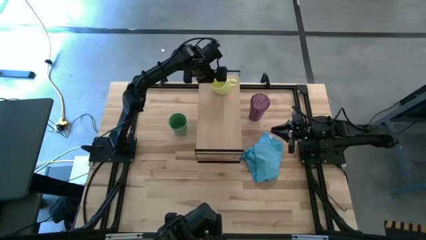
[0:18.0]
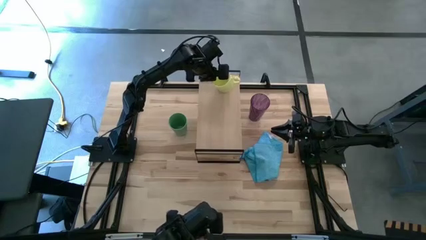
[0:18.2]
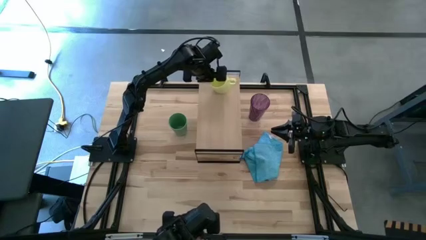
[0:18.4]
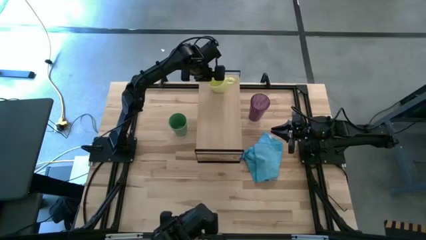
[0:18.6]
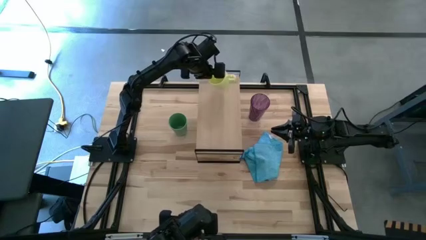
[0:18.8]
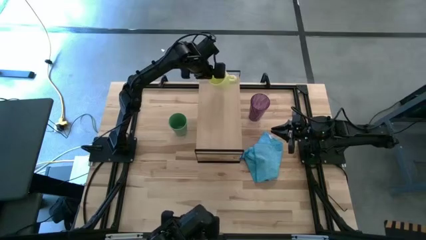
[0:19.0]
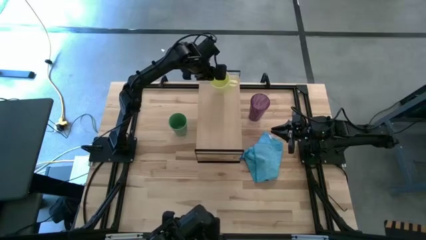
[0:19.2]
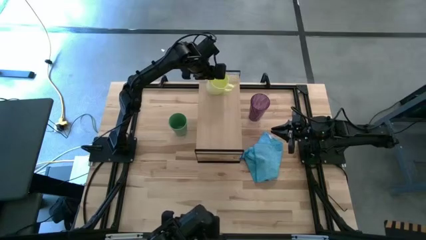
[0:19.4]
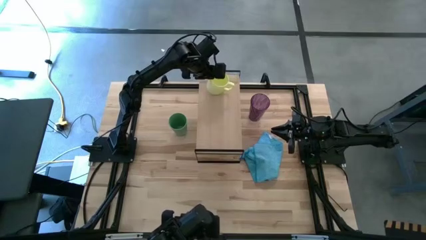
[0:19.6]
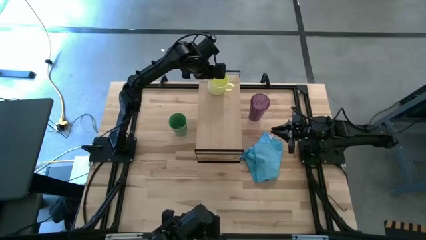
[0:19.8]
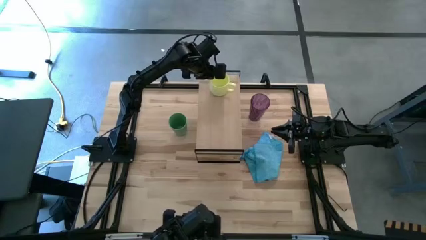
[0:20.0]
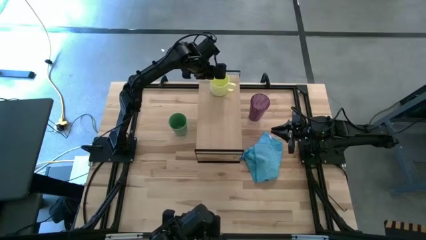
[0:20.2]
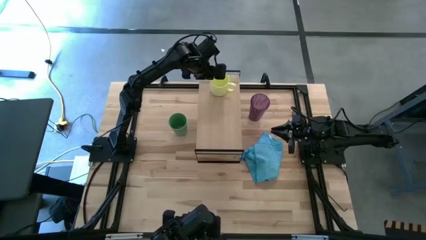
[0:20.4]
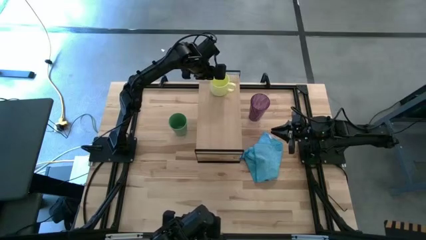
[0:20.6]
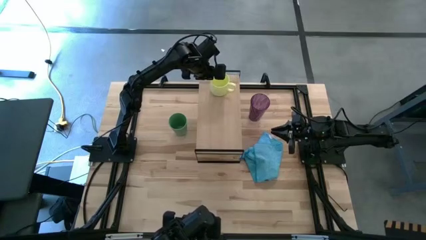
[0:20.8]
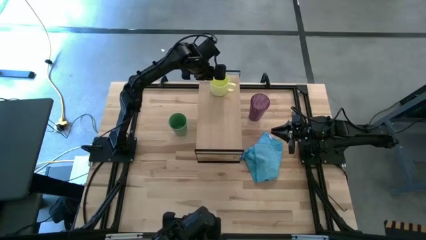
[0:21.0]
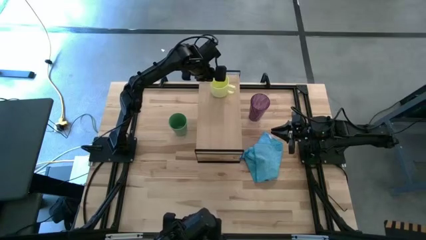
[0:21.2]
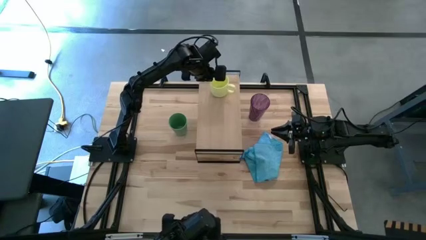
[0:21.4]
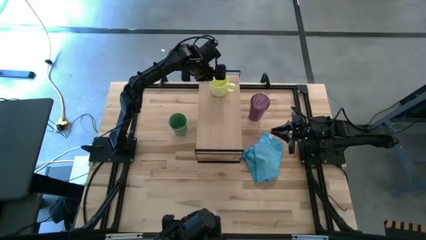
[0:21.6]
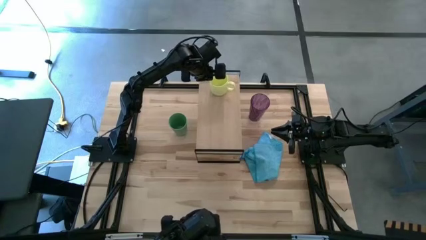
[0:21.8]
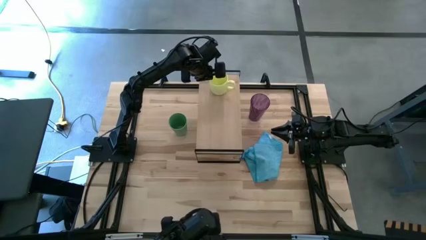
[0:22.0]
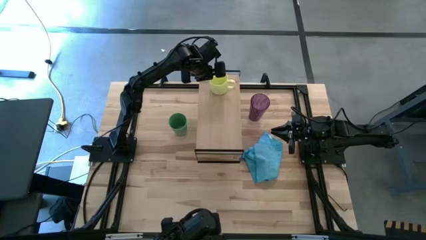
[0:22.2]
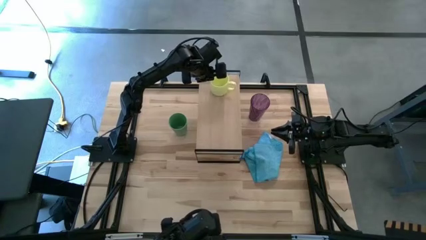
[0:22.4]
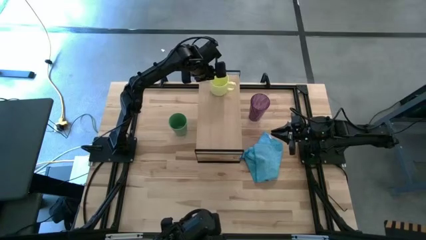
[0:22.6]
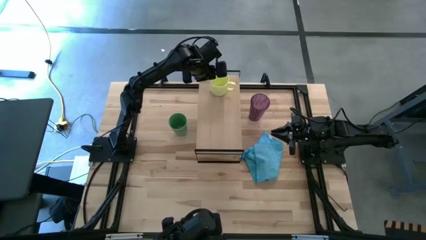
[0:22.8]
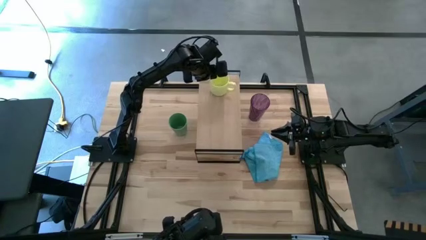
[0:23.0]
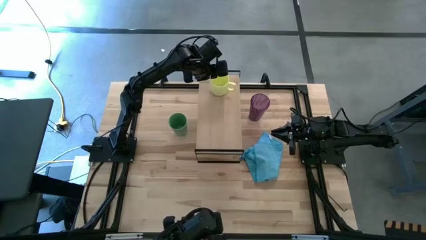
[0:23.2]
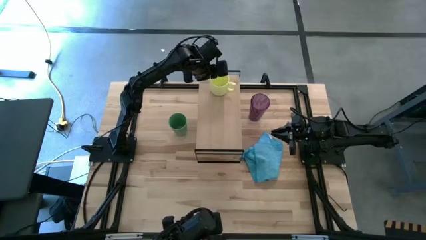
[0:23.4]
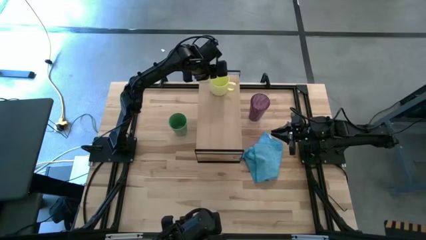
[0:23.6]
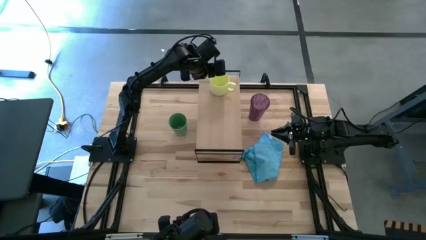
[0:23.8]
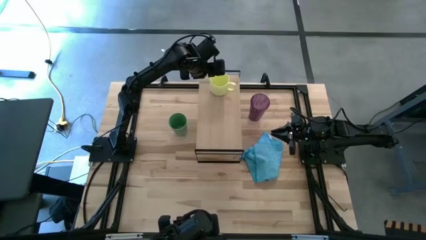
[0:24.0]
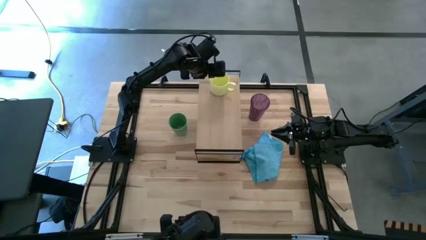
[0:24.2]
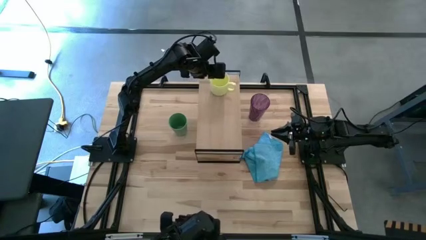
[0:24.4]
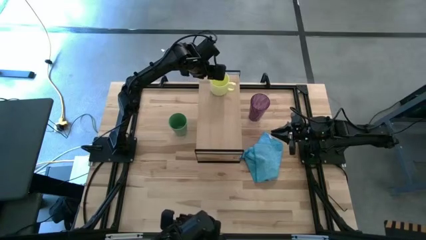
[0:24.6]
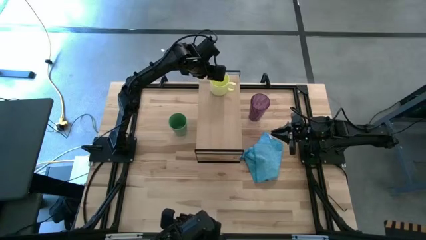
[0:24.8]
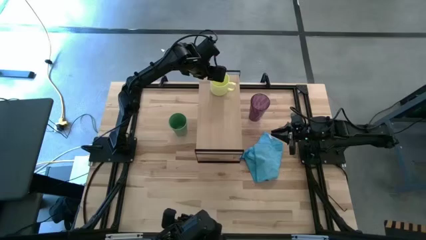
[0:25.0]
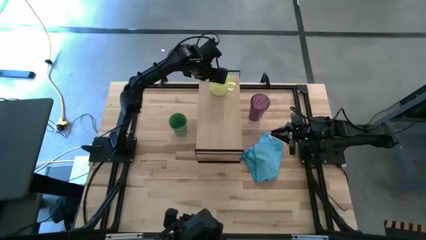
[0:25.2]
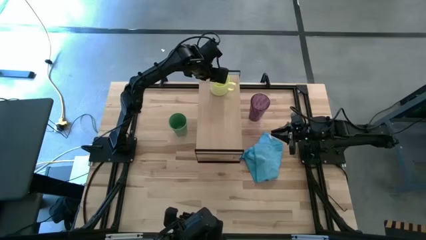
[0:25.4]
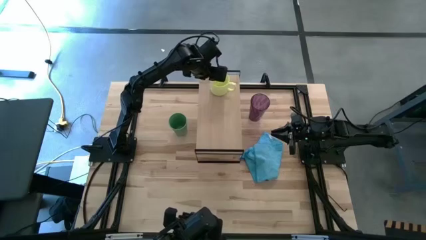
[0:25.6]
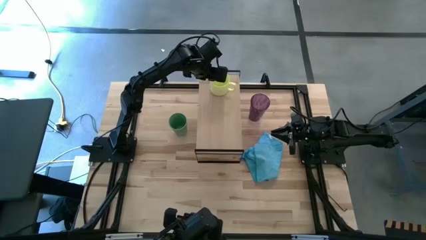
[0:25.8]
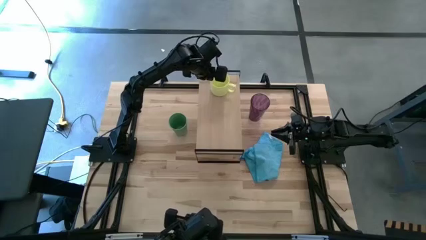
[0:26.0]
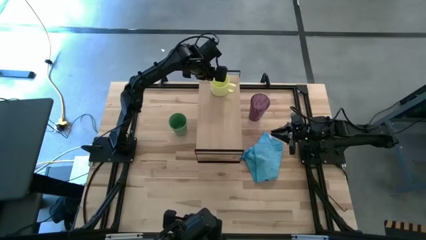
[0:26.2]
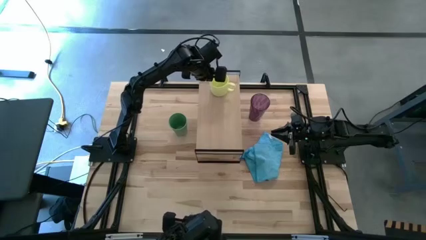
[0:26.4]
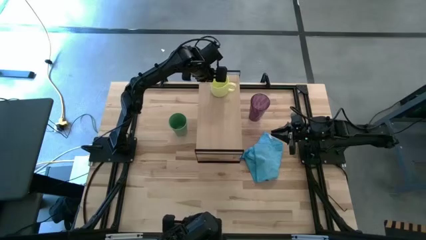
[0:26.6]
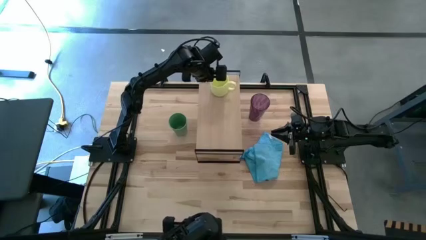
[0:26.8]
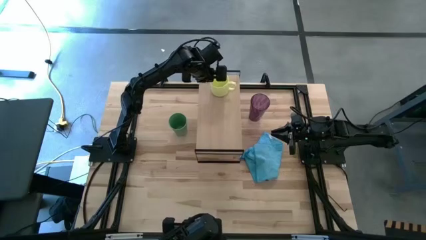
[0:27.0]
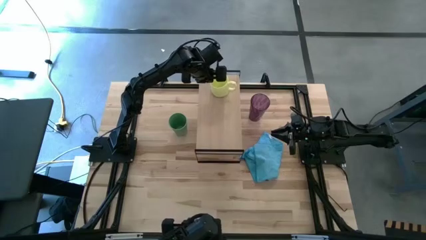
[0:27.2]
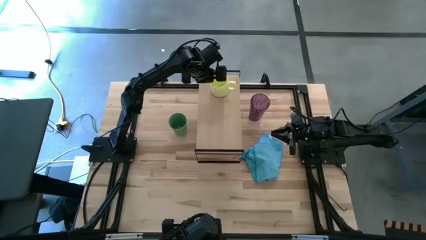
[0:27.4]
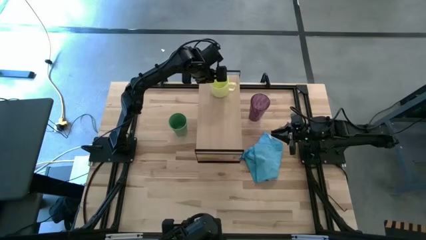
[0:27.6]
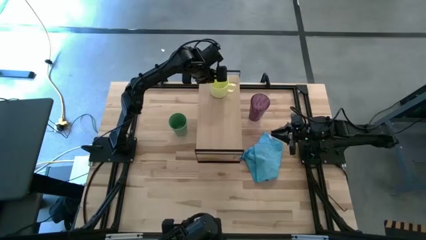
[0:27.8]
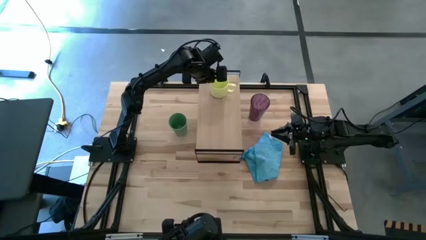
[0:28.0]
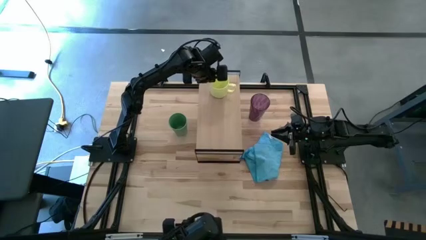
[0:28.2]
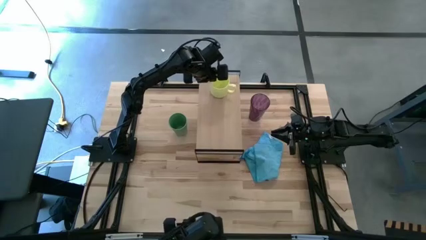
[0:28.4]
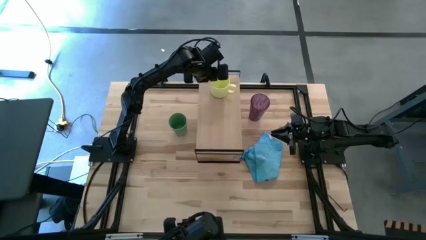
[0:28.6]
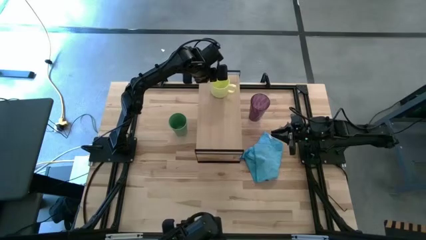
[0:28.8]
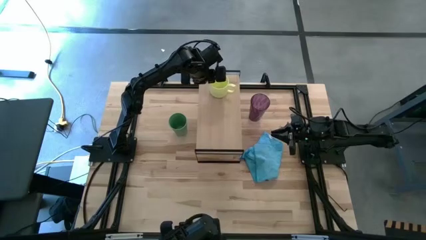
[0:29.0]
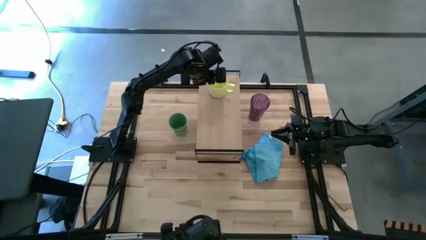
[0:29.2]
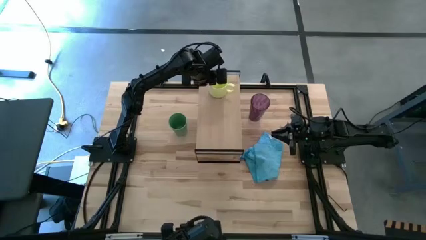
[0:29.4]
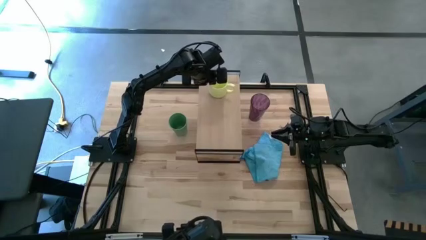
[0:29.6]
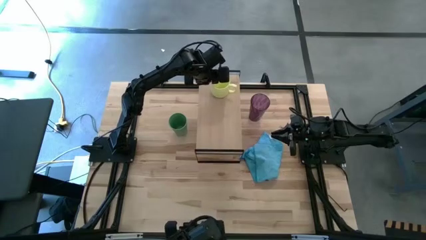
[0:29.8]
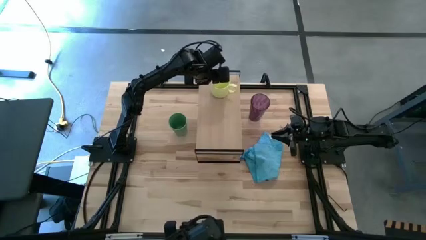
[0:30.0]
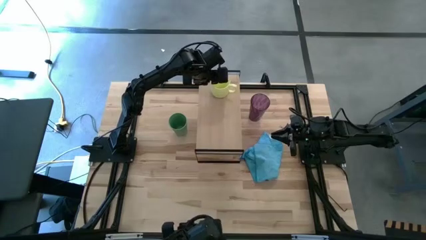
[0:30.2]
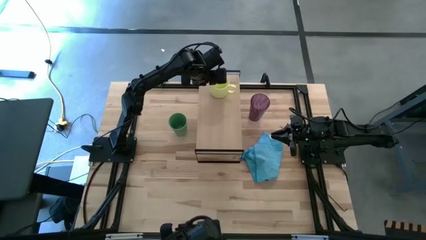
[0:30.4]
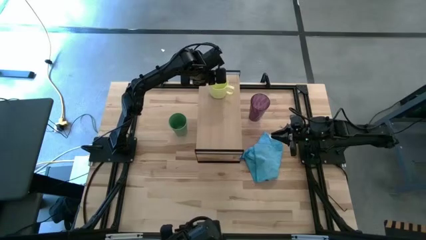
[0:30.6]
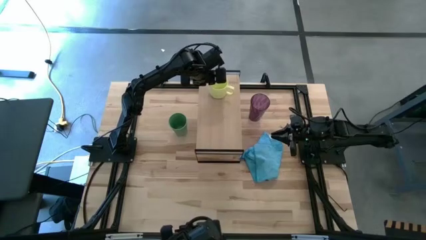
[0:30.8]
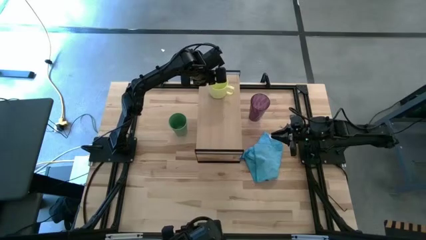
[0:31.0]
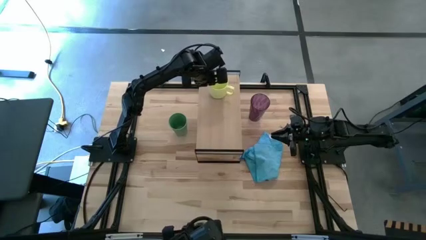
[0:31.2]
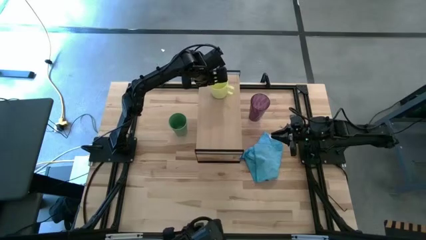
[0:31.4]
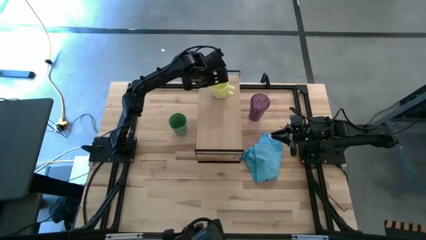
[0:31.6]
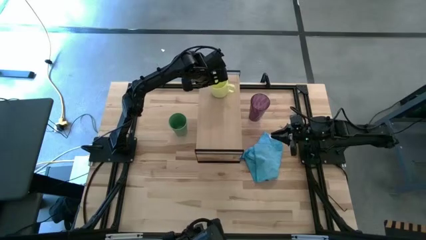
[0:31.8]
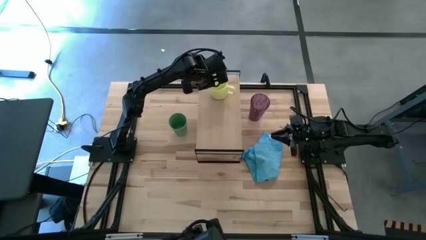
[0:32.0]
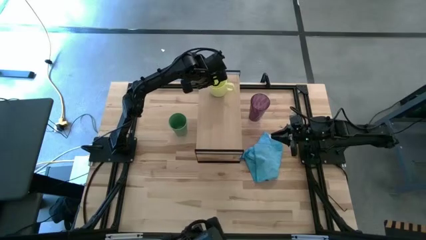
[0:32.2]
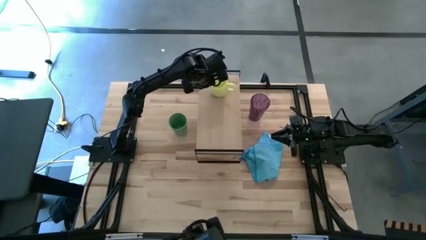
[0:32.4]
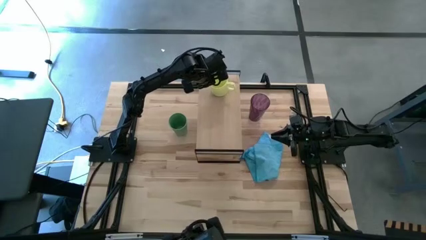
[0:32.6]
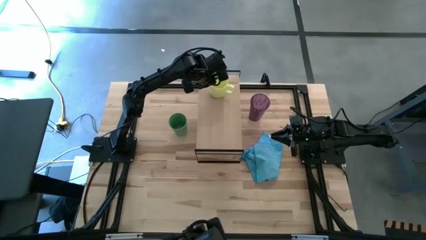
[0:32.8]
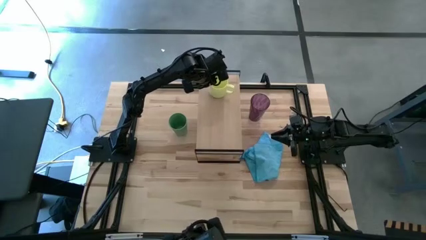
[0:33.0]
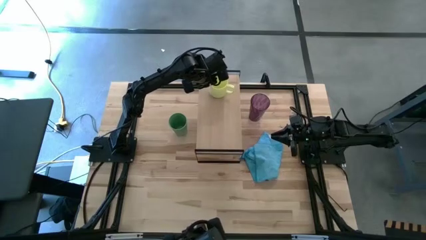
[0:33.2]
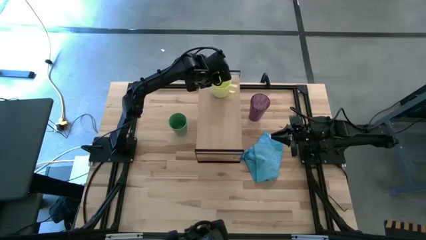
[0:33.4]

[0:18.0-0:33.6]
Task: Stack small to large cups/mugs on shelf
Put the yellow mug on the shelf
